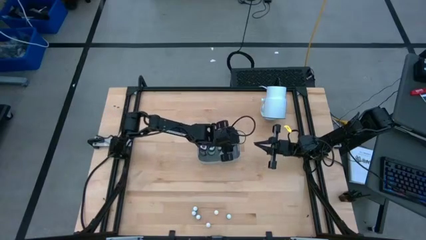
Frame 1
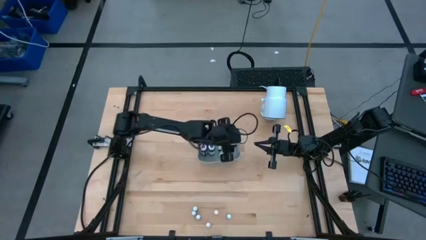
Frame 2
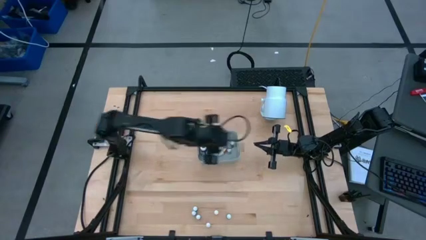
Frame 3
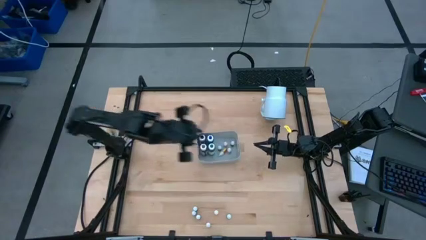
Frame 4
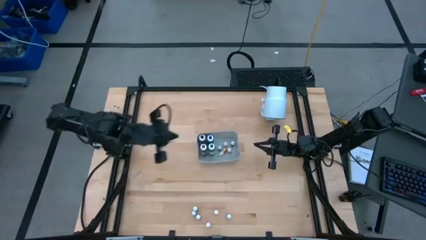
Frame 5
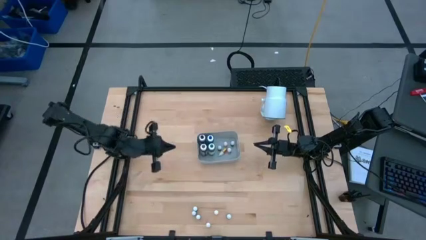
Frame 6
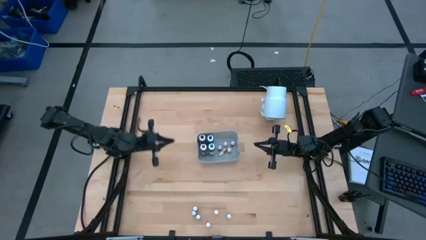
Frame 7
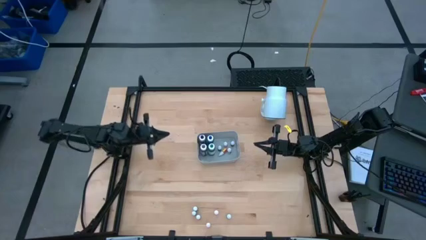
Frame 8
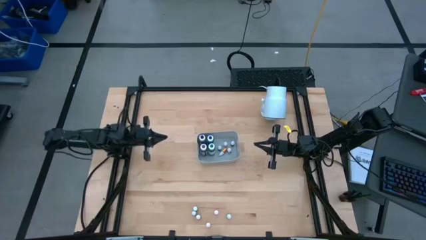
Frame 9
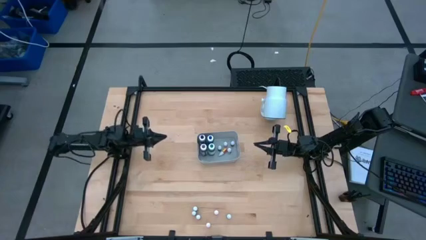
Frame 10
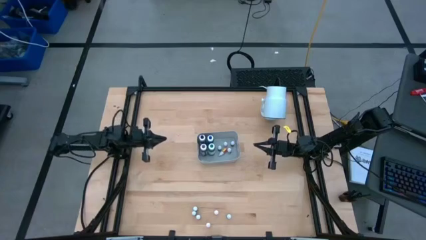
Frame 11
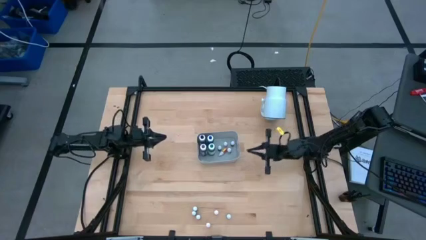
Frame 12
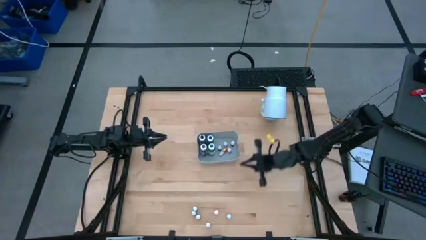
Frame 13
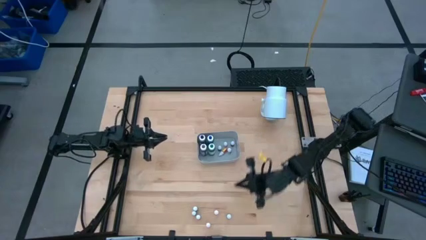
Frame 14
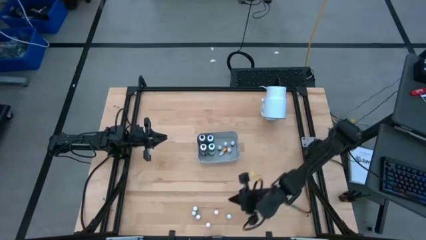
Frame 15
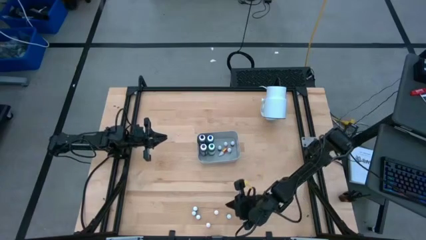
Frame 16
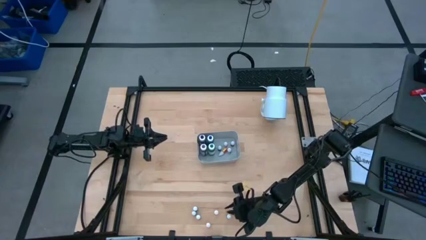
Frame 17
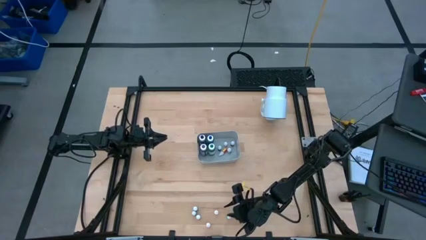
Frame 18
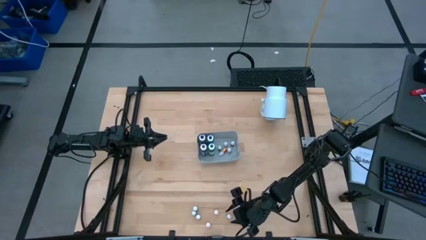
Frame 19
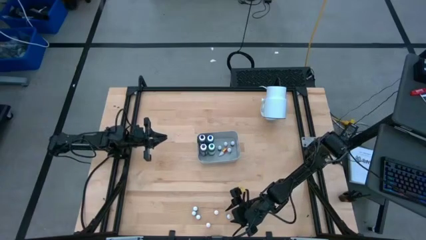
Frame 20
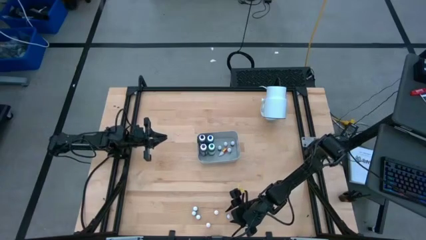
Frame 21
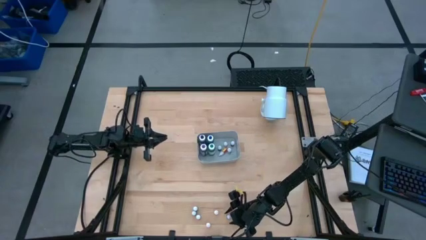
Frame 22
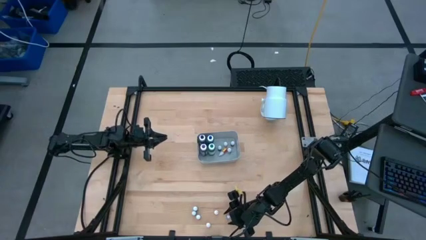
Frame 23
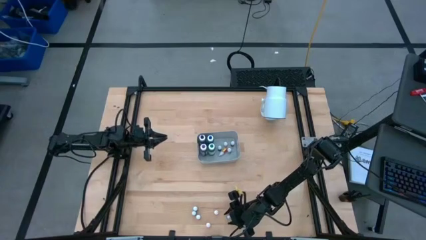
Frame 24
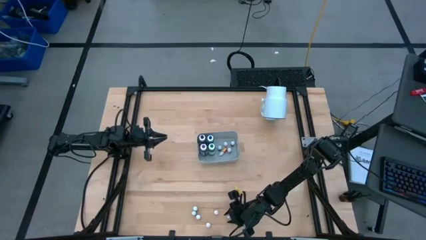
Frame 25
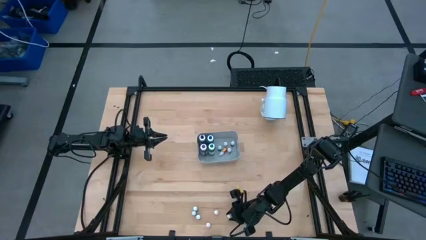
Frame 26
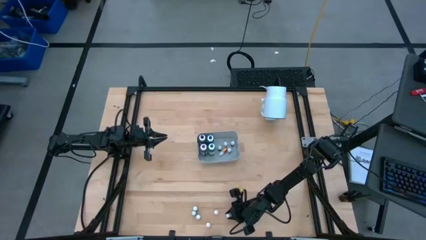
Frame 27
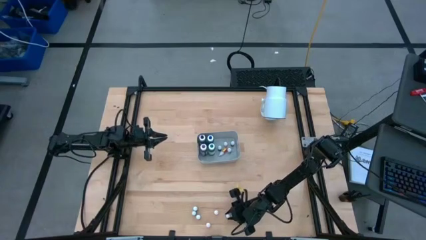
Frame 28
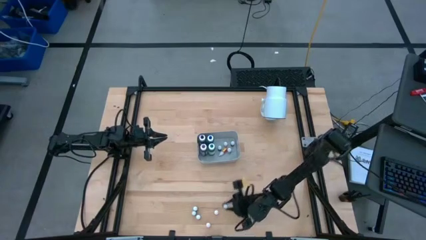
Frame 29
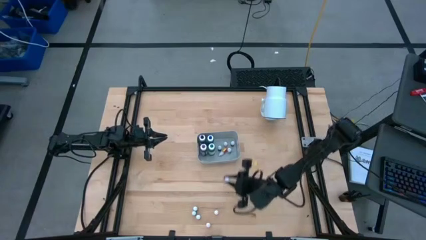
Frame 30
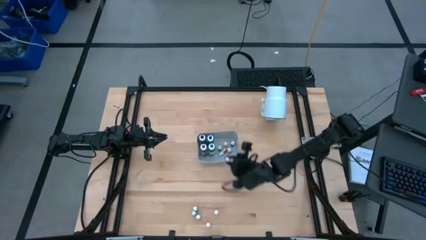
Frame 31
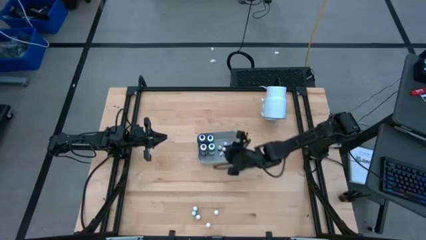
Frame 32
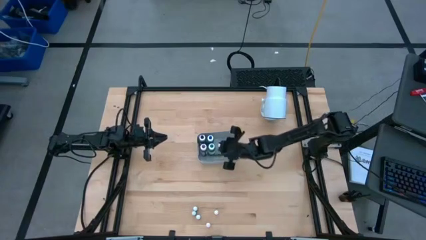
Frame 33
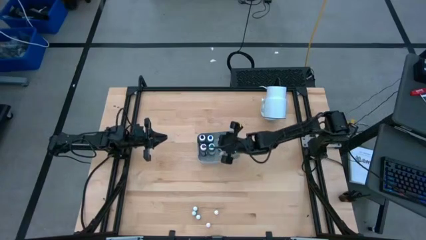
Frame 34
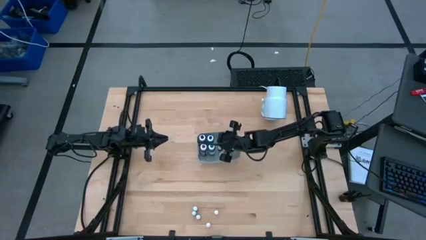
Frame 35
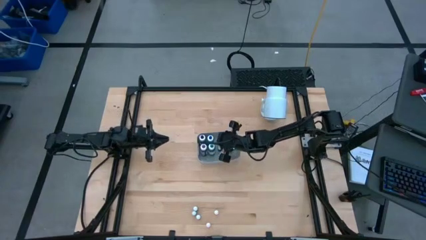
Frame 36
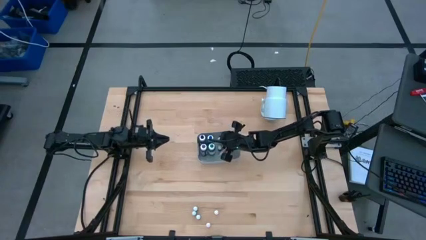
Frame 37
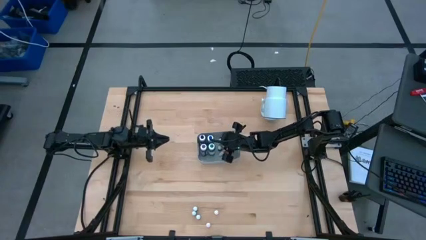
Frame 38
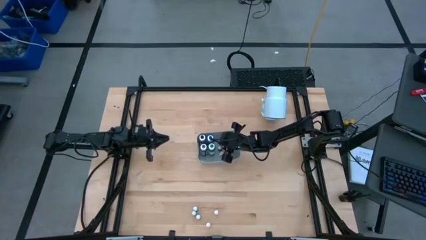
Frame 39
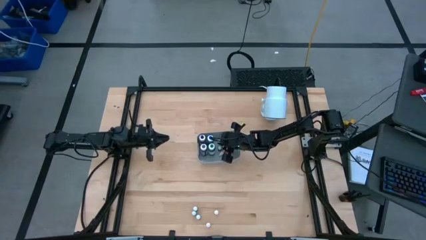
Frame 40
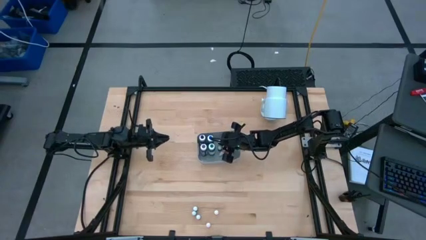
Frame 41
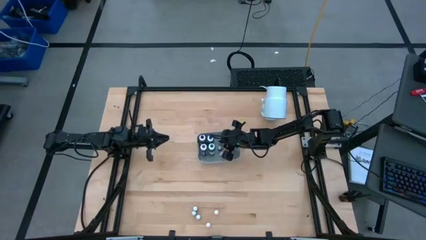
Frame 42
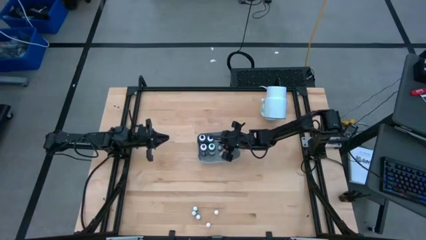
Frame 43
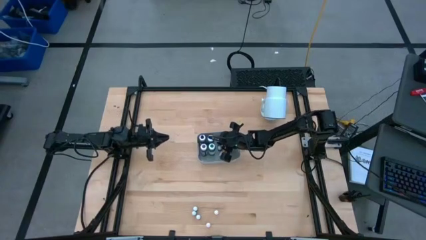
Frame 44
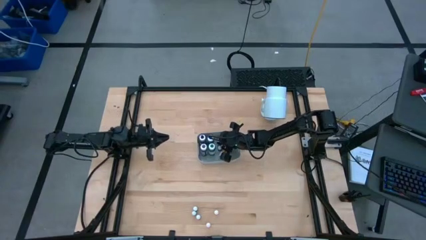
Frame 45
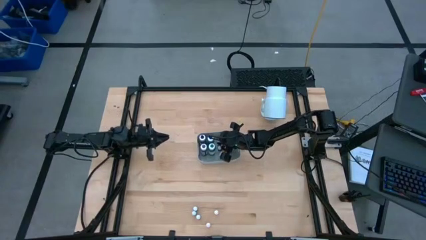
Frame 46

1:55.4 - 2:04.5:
Task: Pick & Place food coloring
Put the small purple food coloring bottle into the white bin

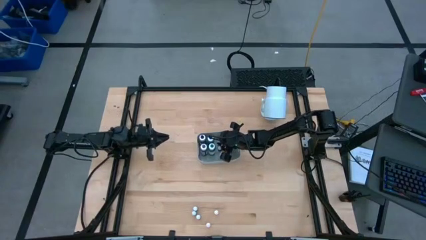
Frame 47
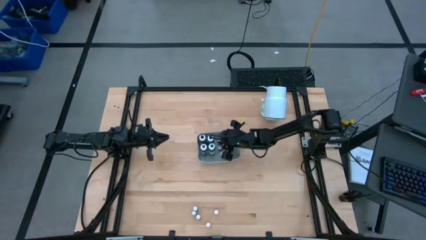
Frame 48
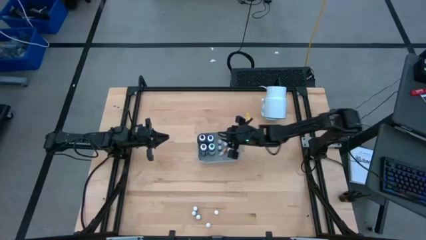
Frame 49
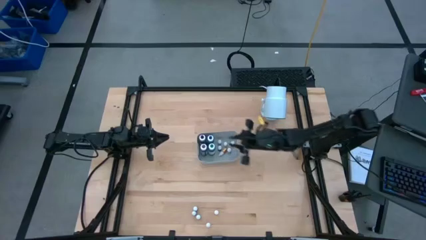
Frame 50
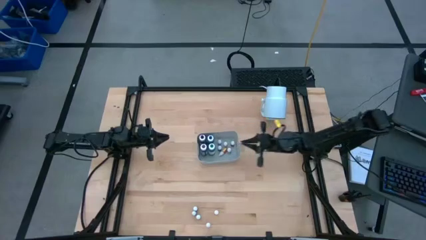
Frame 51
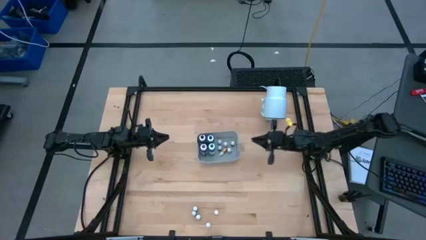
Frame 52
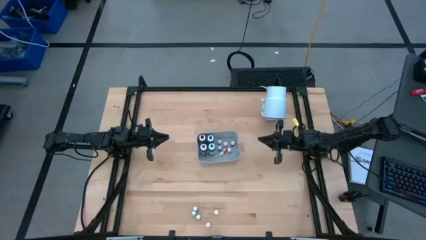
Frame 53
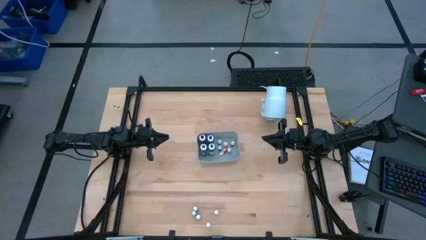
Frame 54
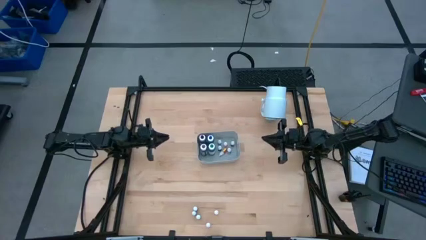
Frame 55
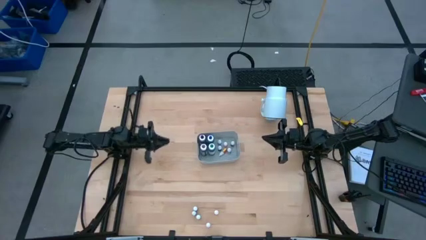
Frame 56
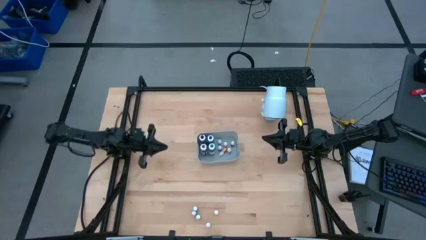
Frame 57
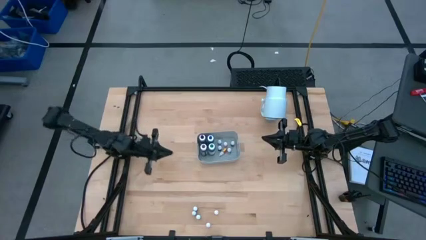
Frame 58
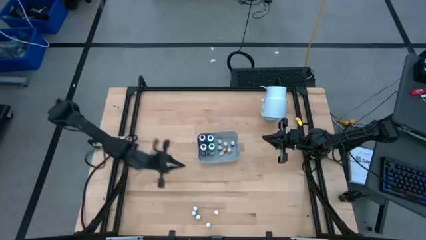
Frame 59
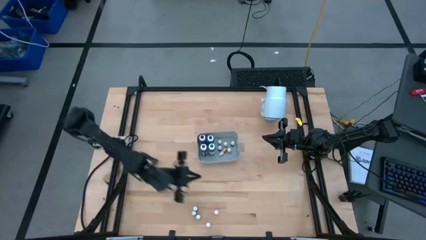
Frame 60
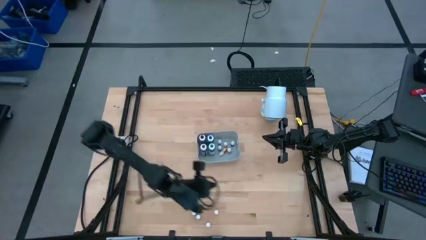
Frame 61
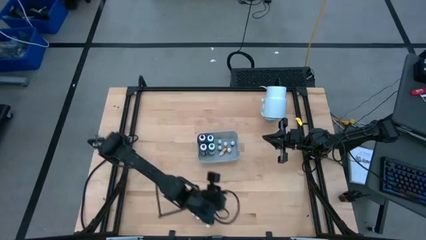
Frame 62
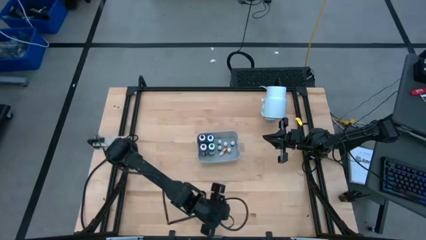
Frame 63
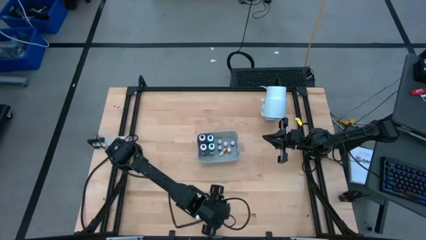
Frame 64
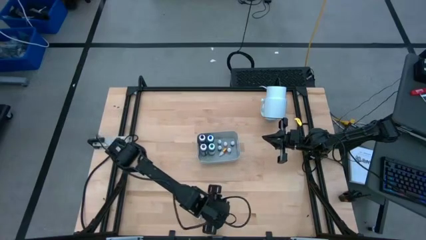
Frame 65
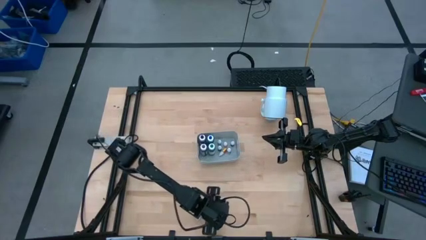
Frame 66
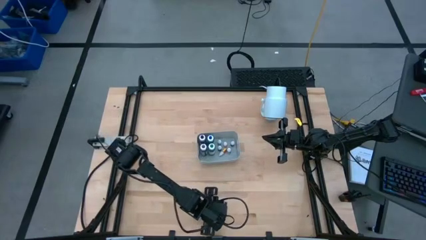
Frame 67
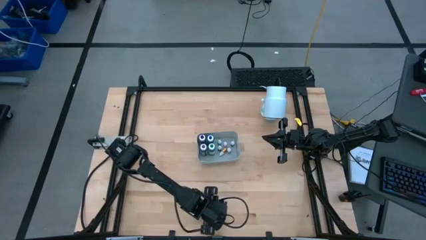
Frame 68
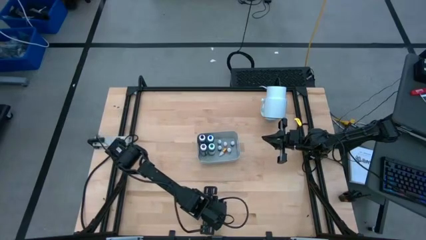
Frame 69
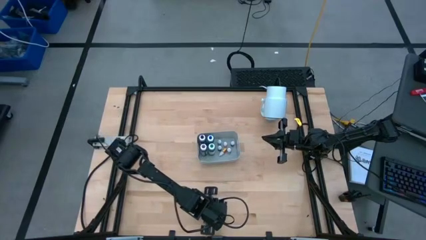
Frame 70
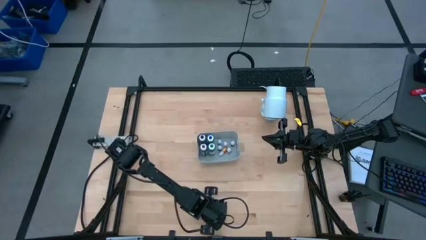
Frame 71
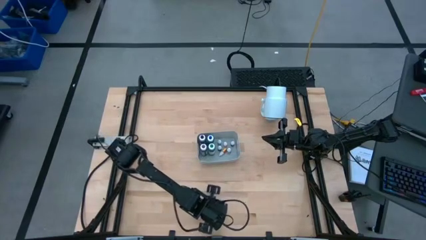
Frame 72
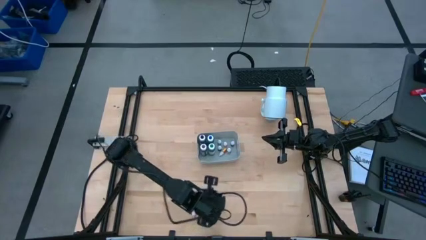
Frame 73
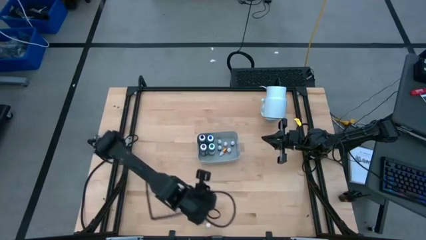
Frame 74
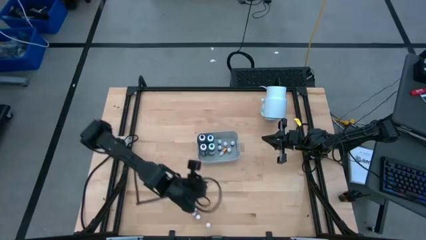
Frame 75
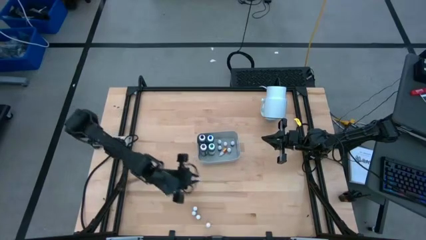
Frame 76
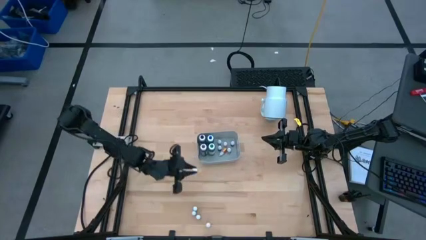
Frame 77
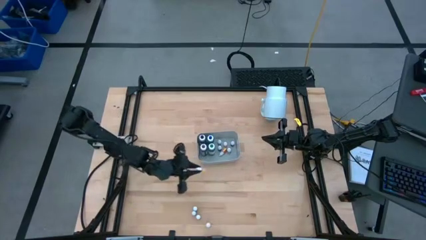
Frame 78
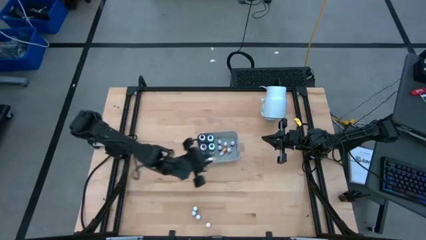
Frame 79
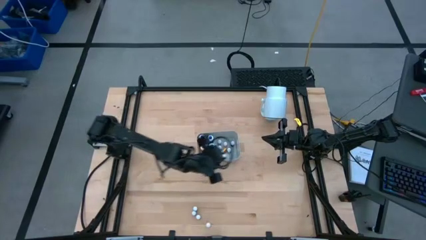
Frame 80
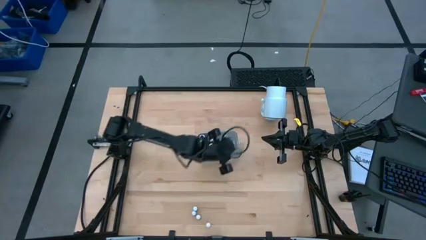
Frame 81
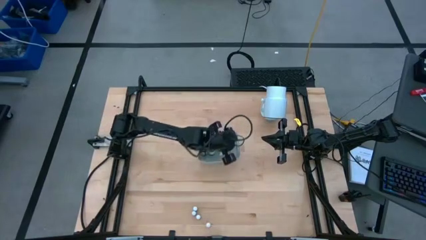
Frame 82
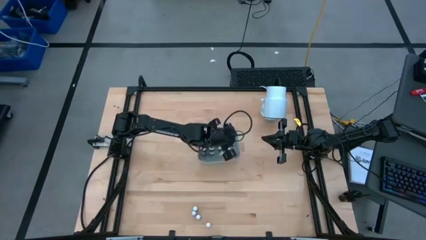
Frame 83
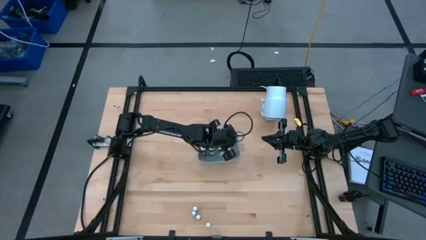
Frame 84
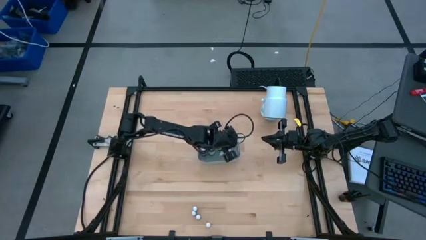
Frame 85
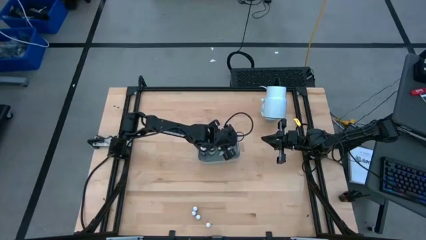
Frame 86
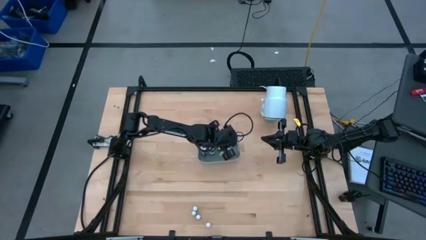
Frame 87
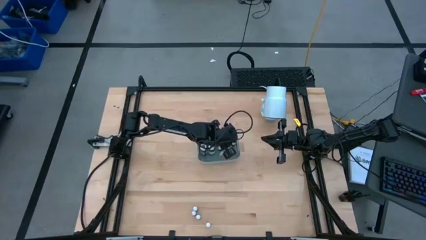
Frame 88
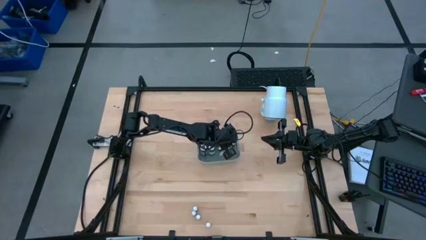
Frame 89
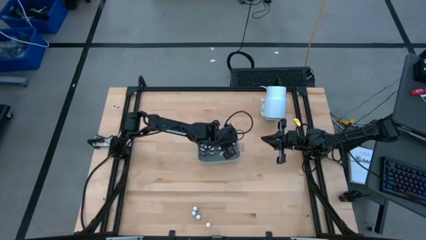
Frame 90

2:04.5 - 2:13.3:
Put the small yellow food coloring bottle into the white bin
